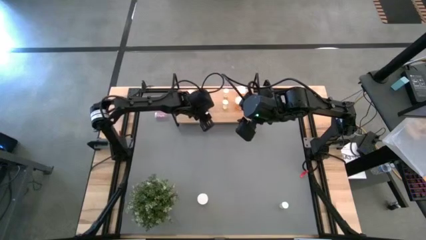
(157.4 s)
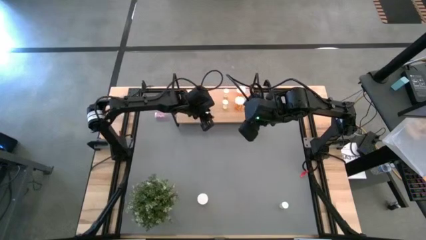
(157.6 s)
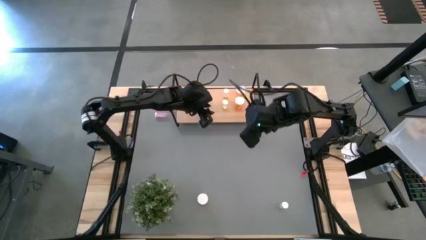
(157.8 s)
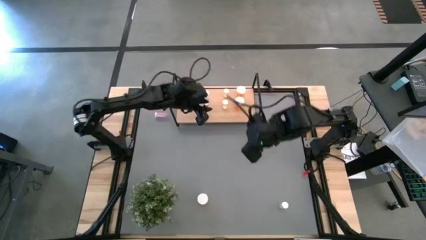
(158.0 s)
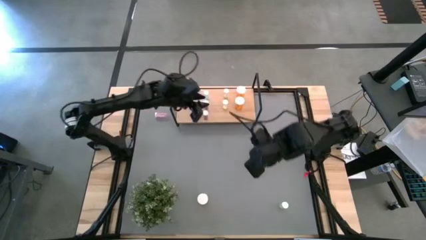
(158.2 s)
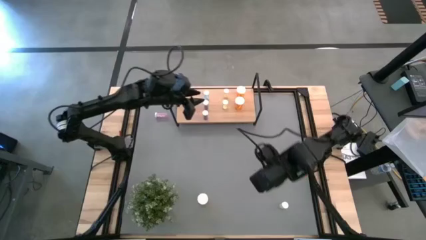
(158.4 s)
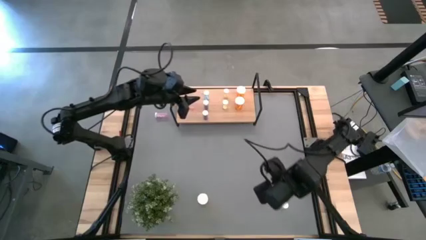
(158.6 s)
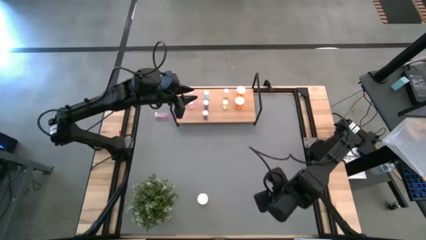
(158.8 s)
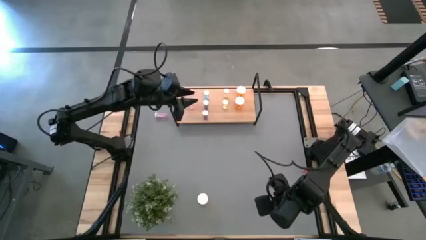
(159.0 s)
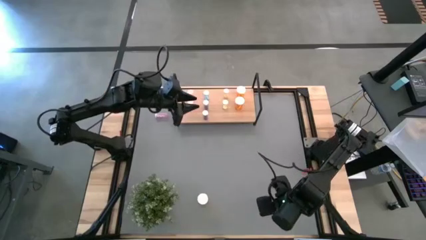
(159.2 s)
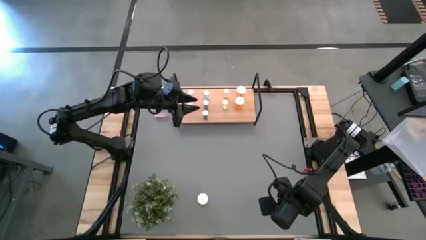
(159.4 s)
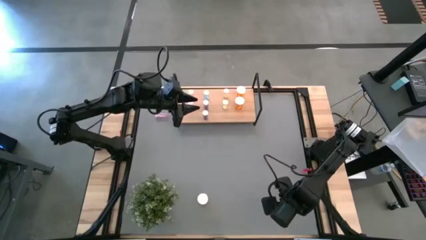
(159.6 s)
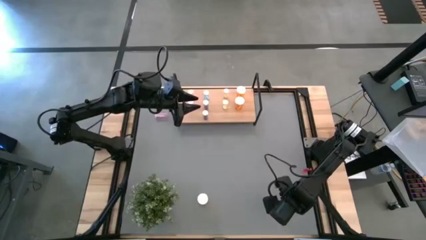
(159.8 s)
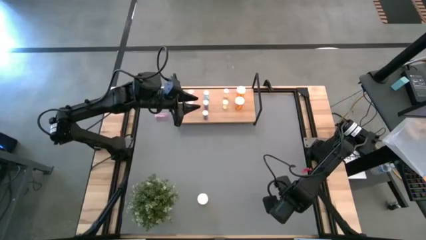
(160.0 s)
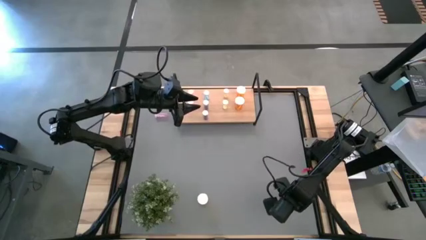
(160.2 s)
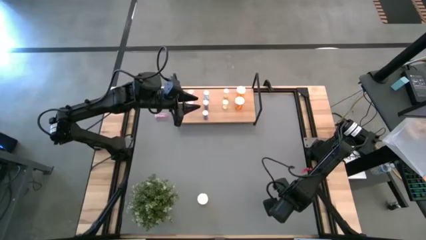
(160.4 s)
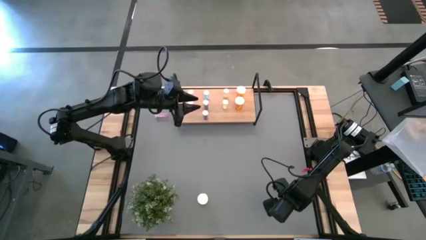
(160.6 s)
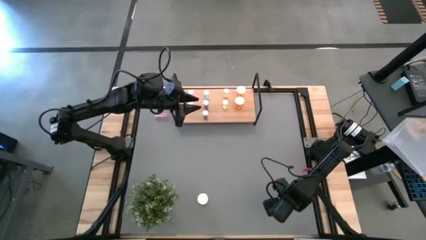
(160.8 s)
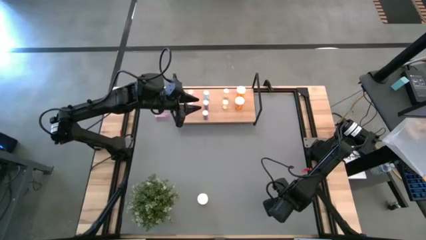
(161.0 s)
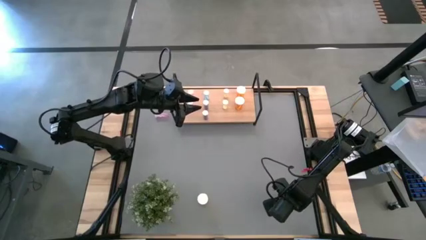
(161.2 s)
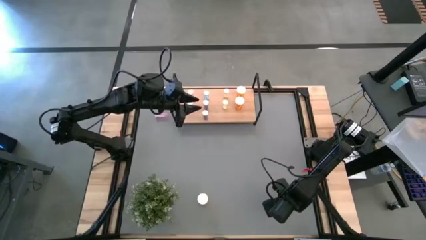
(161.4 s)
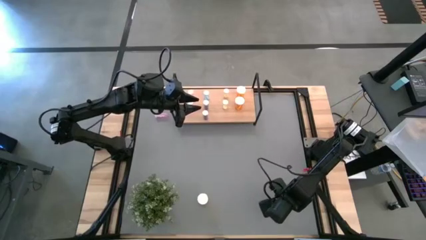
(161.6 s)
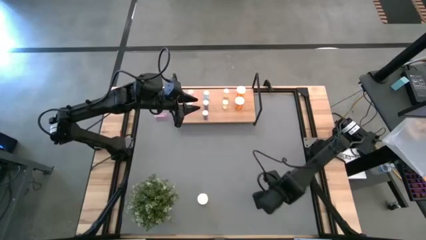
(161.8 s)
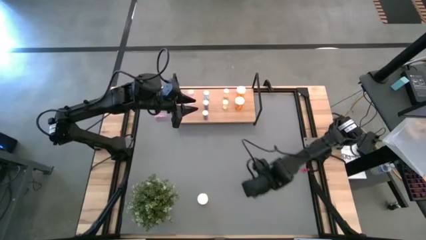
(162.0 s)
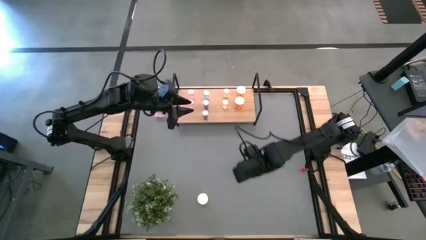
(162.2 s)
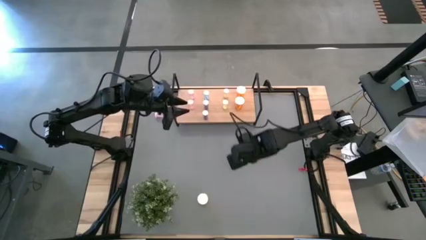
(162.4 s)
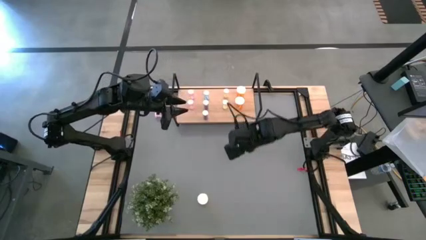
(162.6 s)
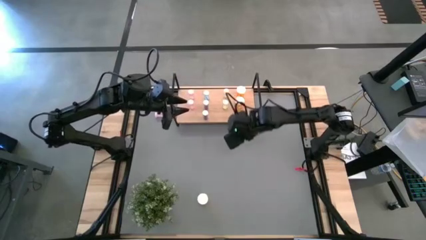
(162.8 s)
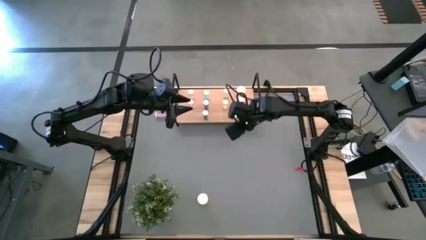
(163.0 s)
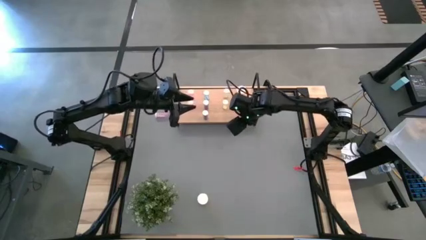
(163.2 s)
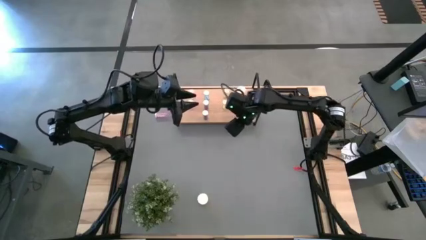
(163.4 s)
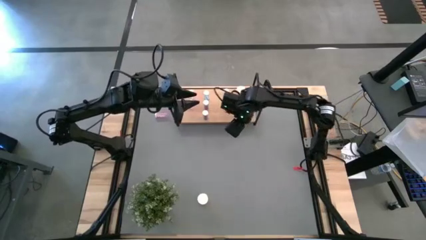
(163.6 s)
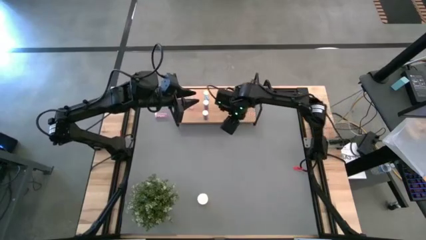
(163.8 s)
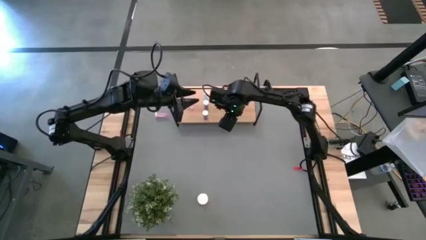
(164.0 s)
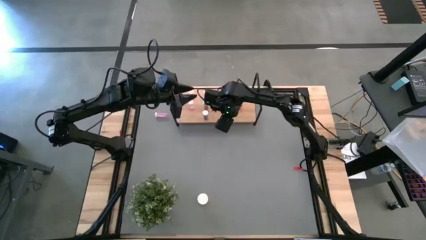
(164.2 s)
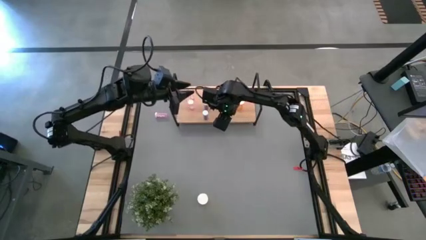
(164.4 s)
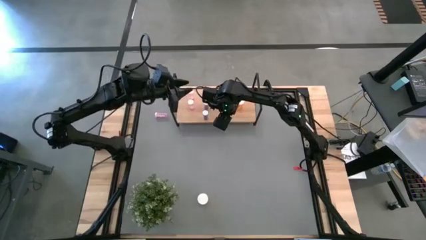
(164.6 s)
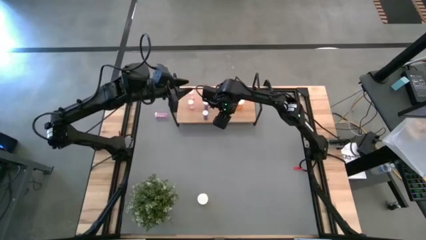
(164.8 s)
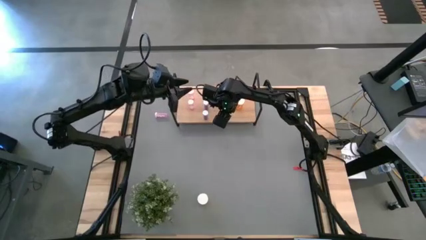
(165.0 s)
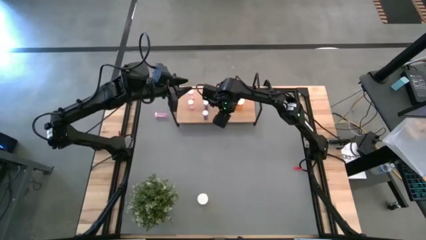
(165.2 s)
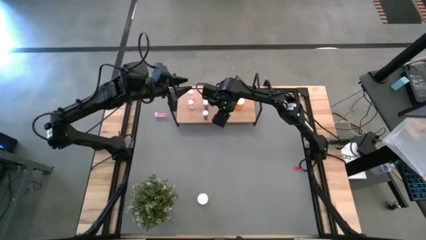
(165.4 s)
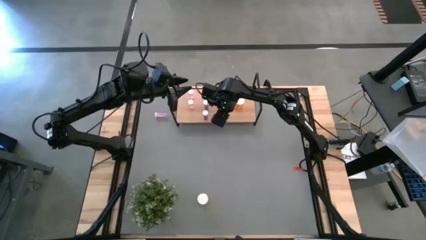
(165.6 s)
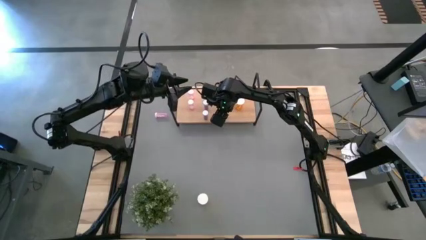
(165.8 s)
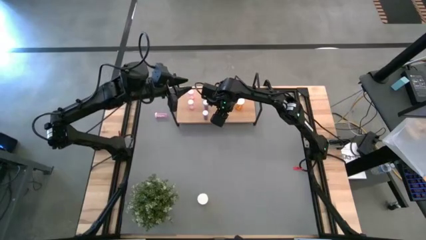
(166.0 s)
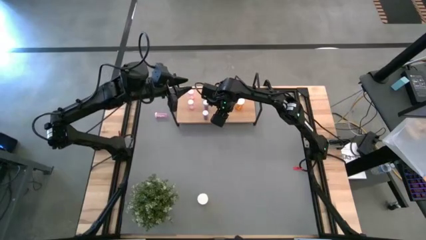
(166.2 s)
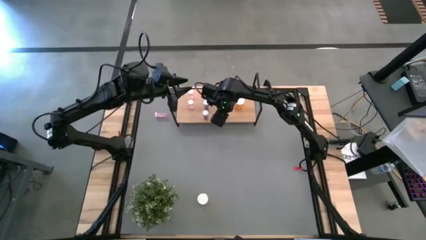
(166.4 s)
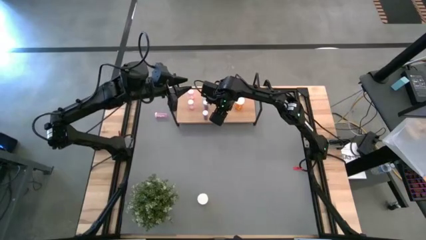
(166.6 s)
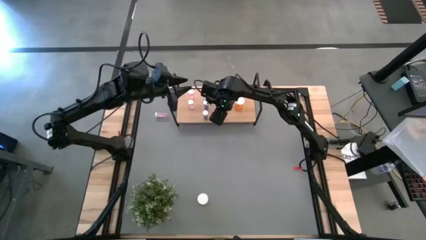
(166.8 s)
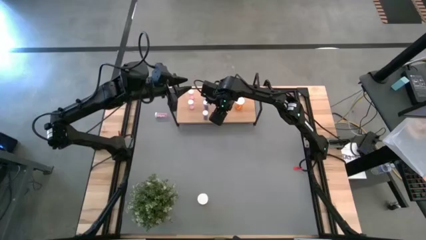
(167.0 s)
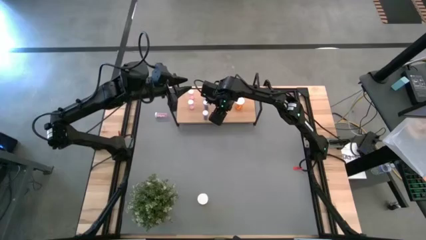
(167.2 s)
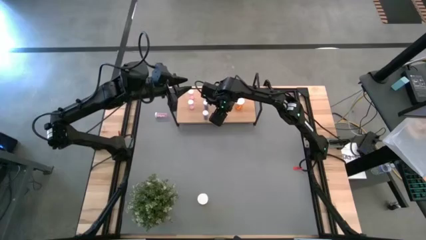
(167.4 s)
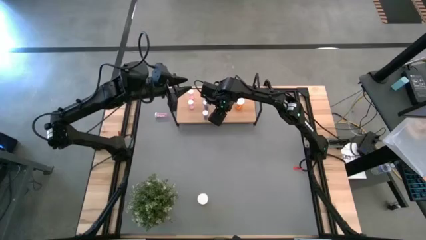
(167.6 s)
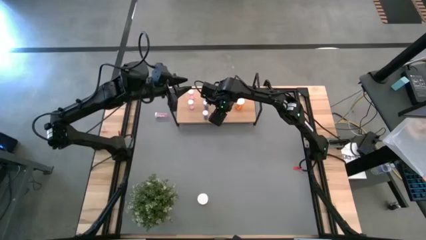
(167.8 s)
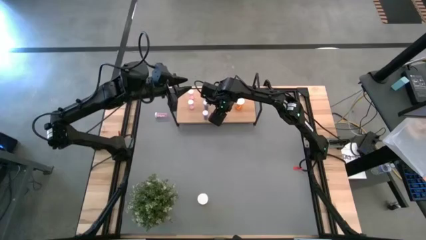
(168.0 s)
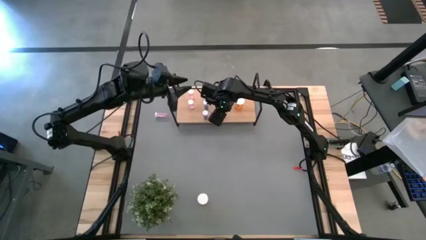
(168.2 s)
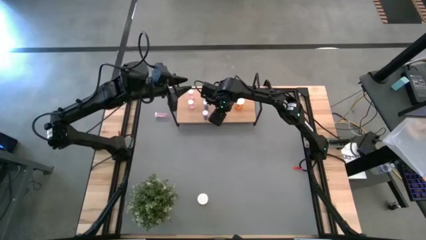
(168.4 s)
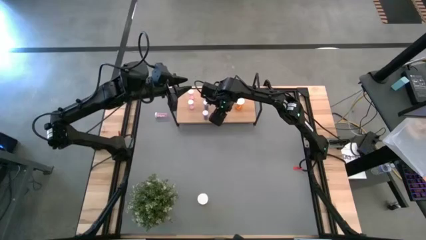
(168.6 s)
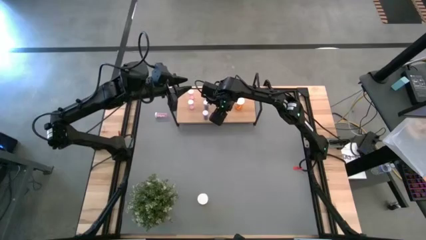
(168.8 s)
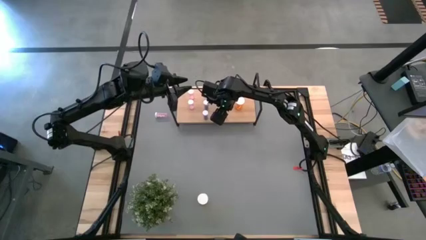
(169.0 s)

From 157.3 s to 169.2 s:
Task: Pick and place medicine bottles onto shelf by color
Put the yellow pill bottle on the shelf aligned with the other yellow pill bottles
